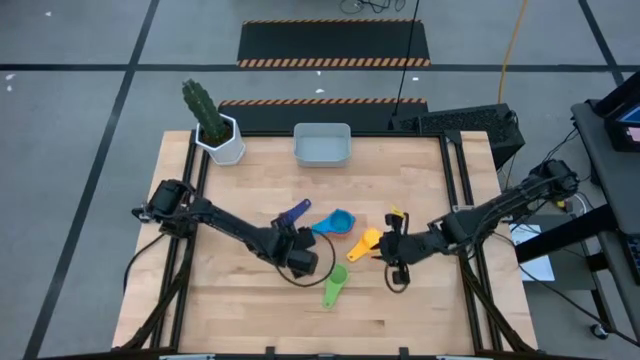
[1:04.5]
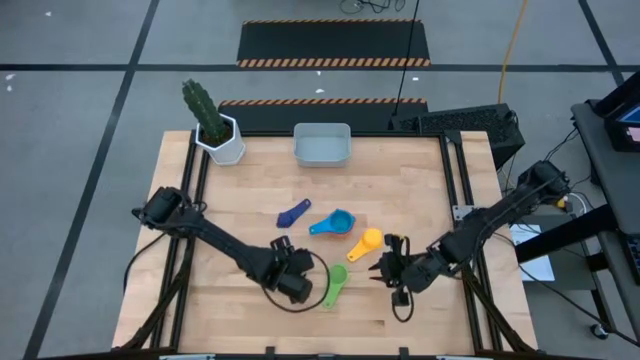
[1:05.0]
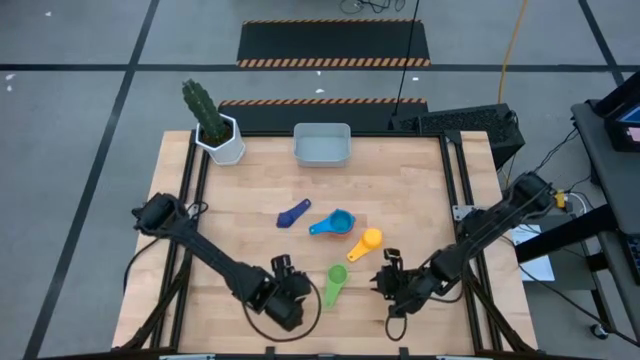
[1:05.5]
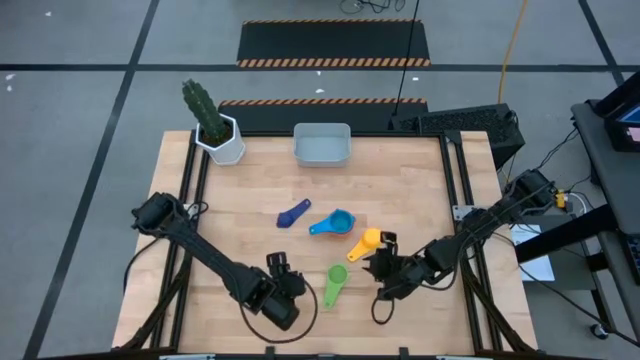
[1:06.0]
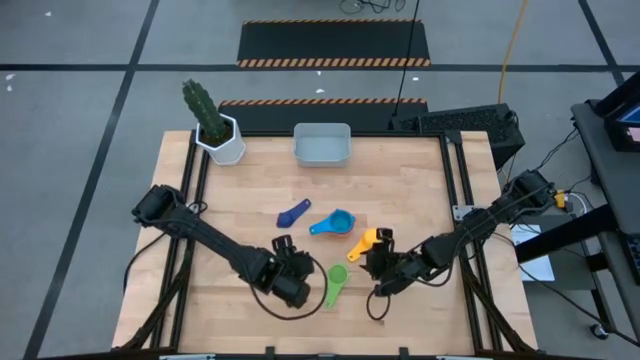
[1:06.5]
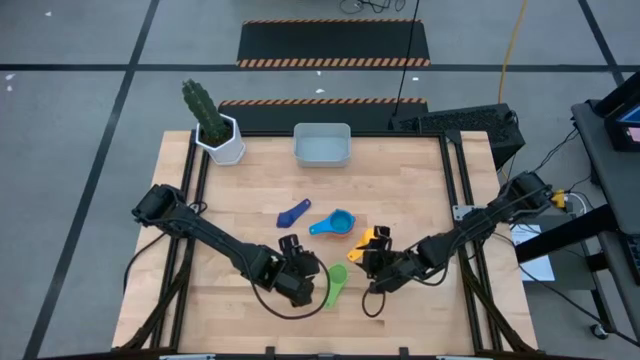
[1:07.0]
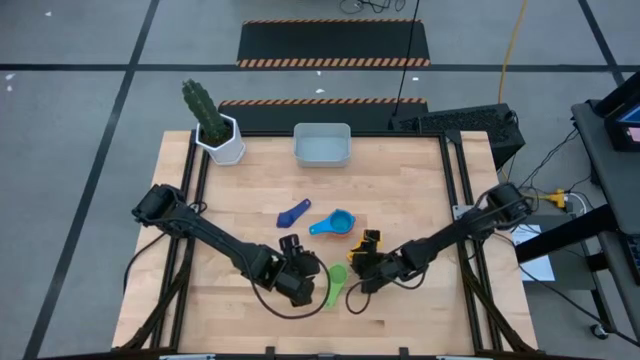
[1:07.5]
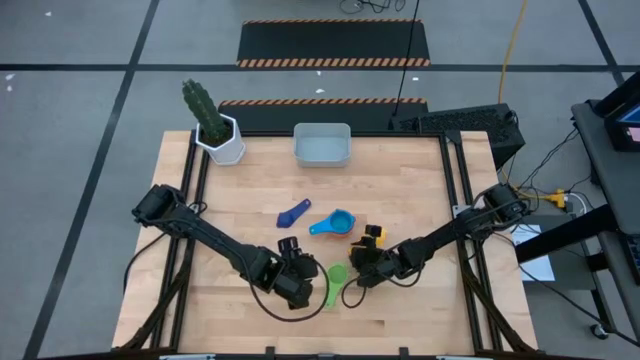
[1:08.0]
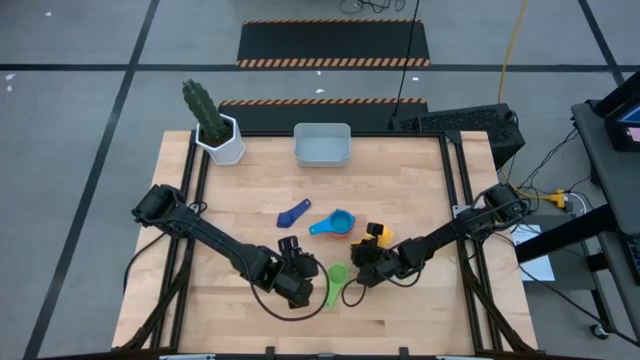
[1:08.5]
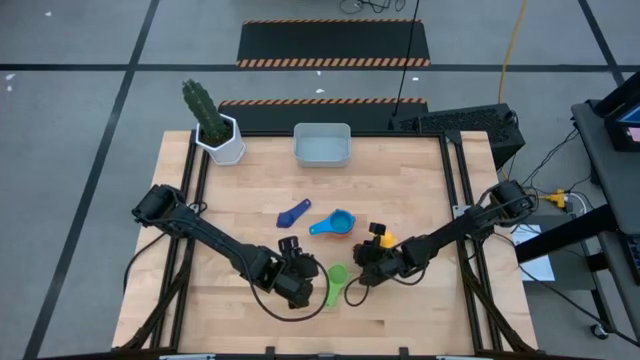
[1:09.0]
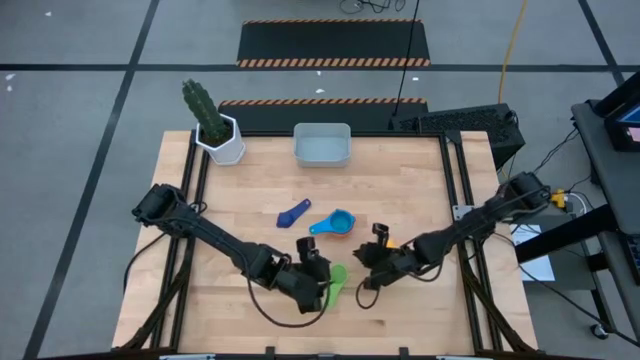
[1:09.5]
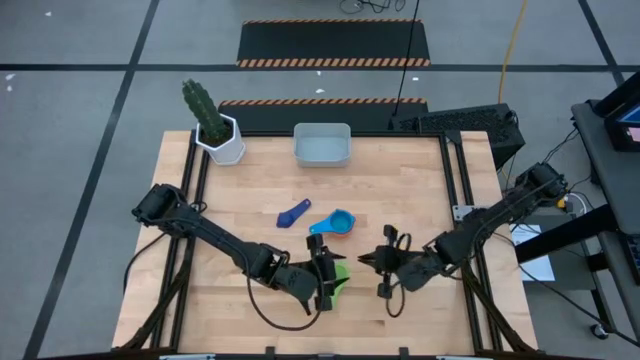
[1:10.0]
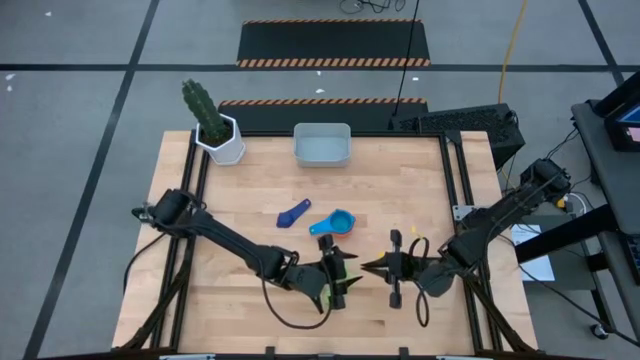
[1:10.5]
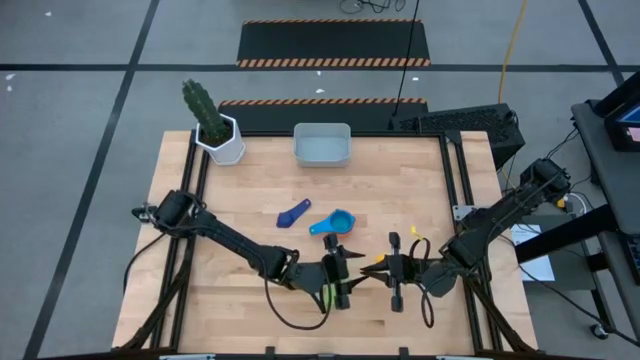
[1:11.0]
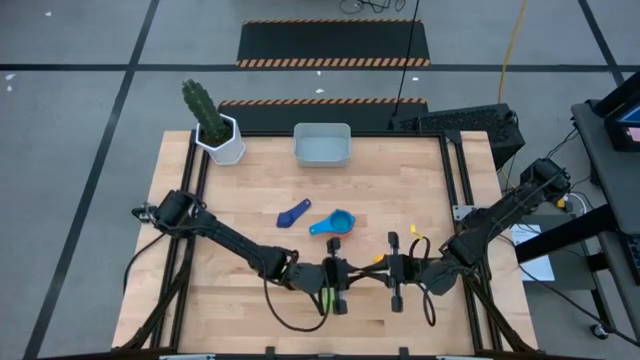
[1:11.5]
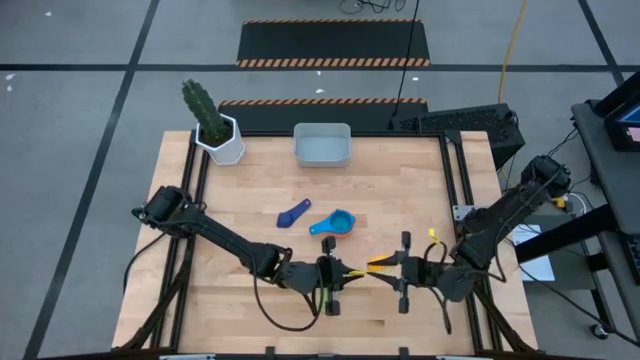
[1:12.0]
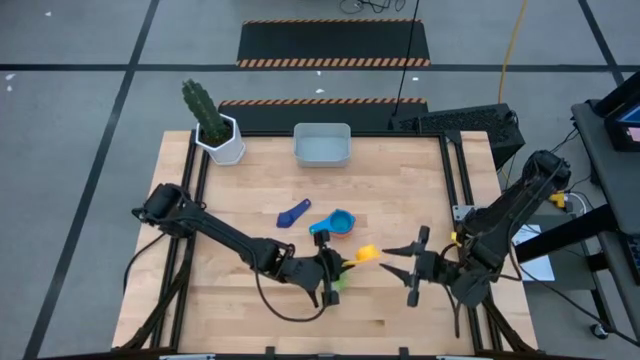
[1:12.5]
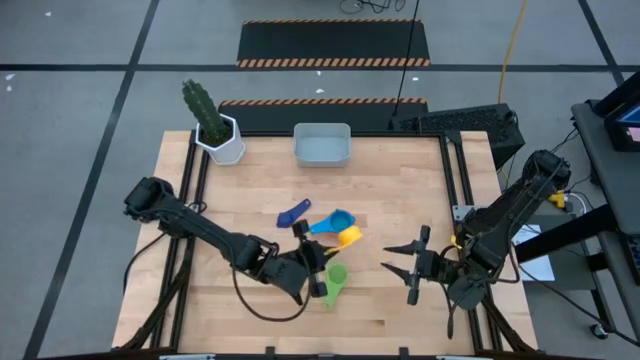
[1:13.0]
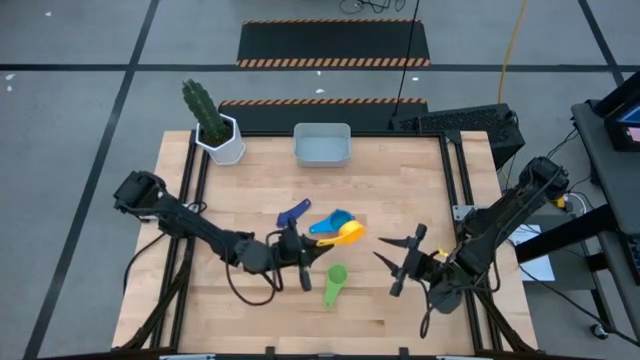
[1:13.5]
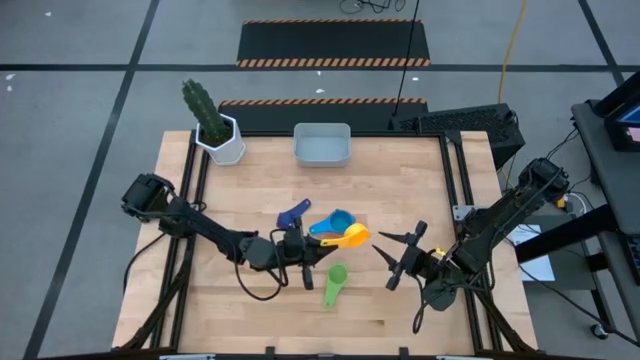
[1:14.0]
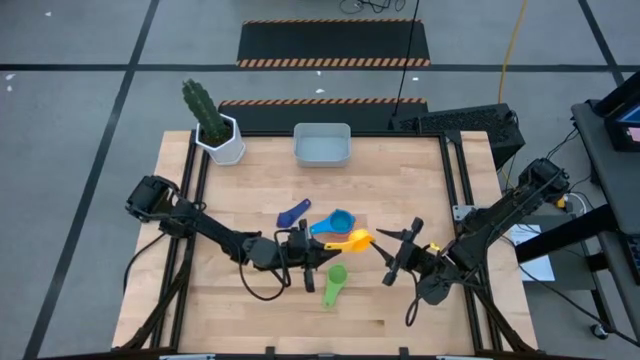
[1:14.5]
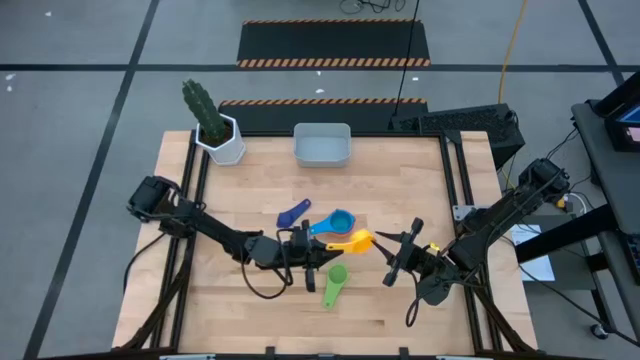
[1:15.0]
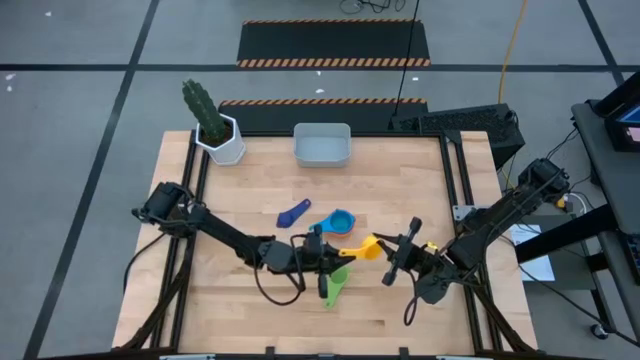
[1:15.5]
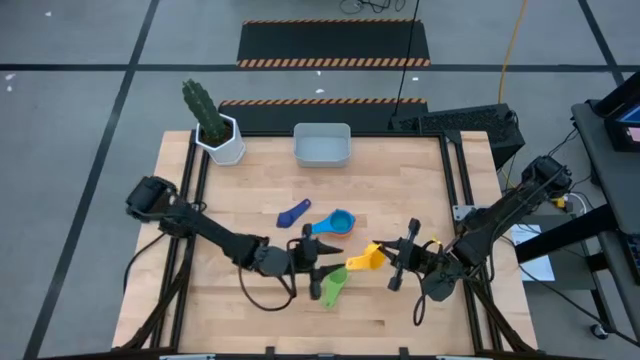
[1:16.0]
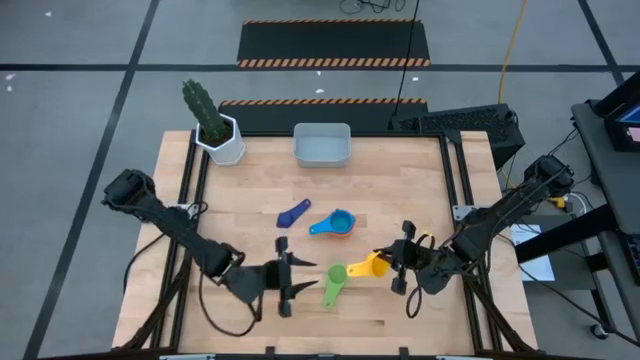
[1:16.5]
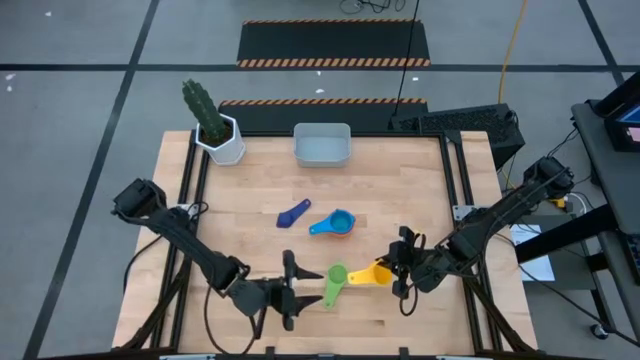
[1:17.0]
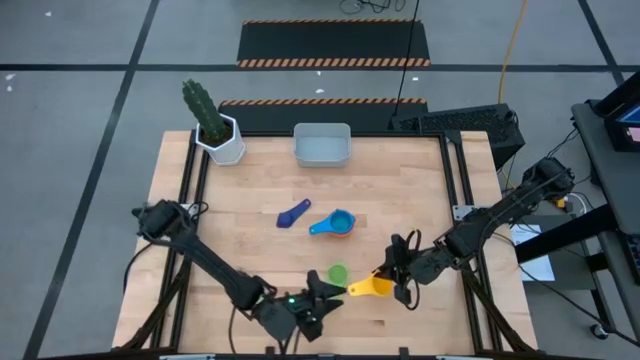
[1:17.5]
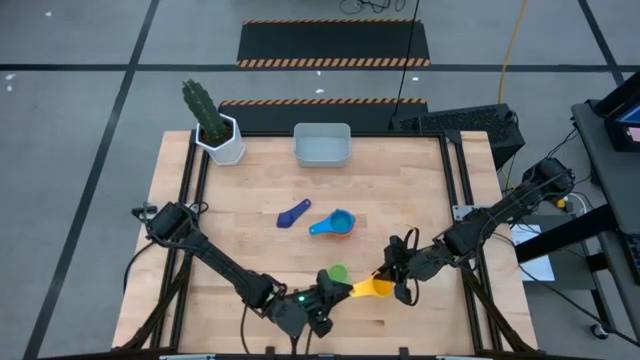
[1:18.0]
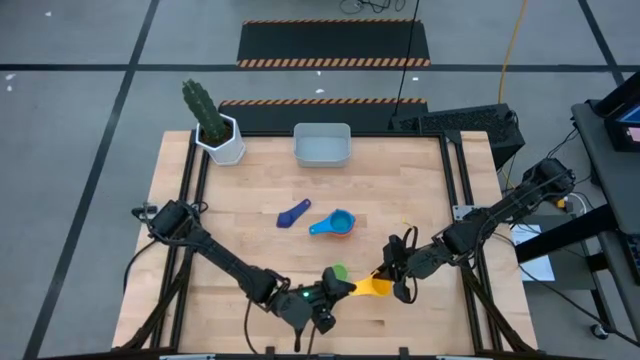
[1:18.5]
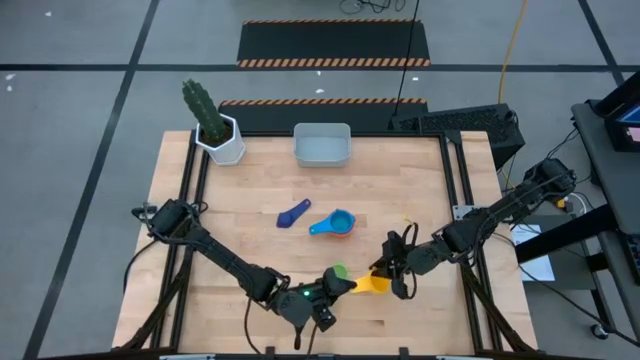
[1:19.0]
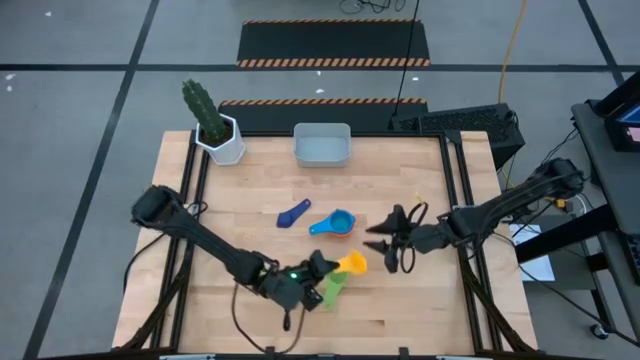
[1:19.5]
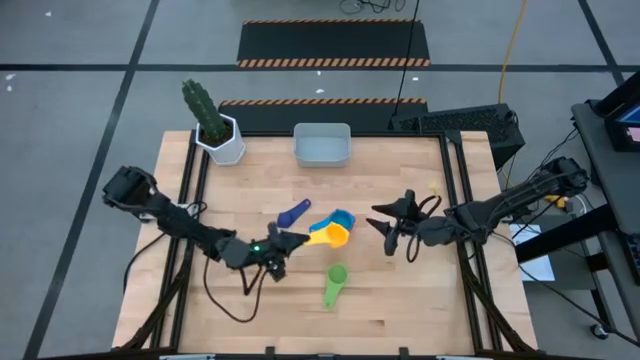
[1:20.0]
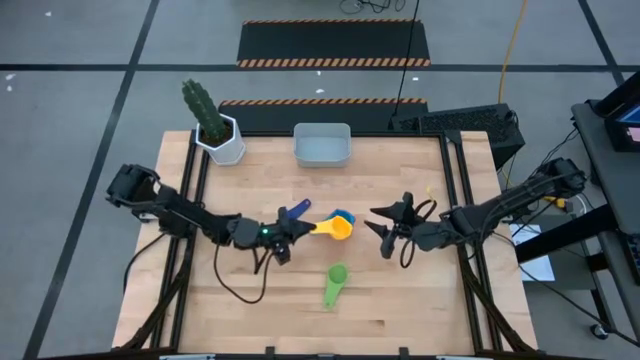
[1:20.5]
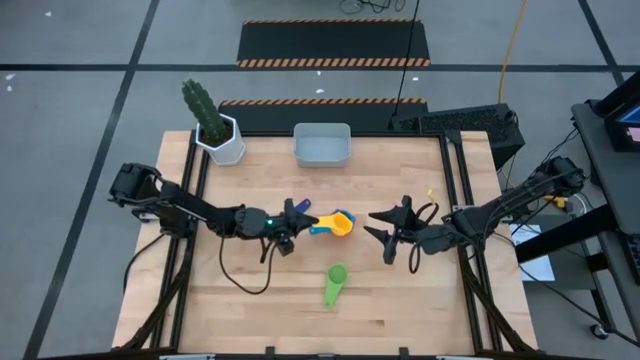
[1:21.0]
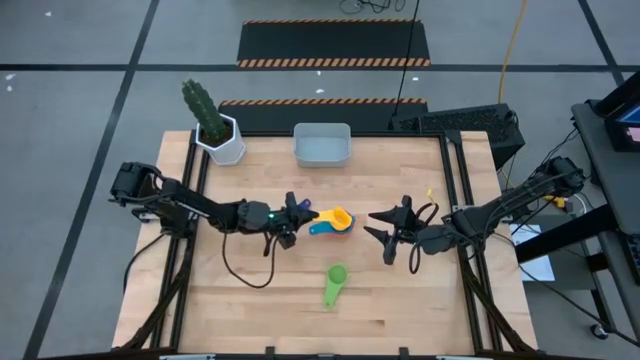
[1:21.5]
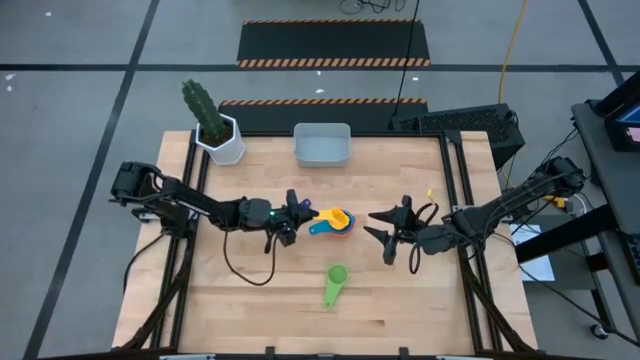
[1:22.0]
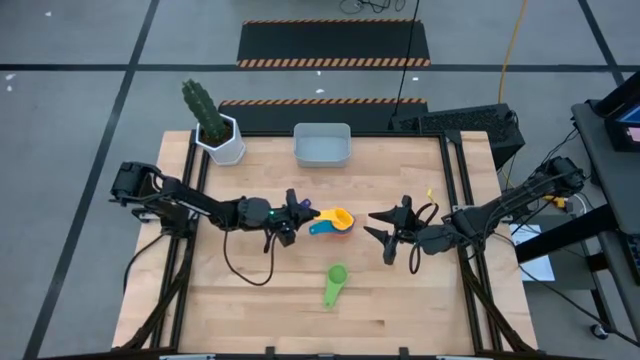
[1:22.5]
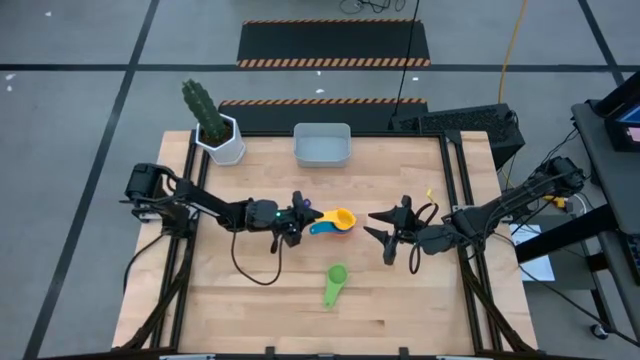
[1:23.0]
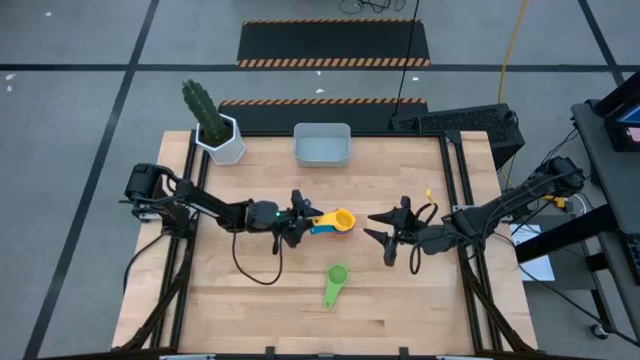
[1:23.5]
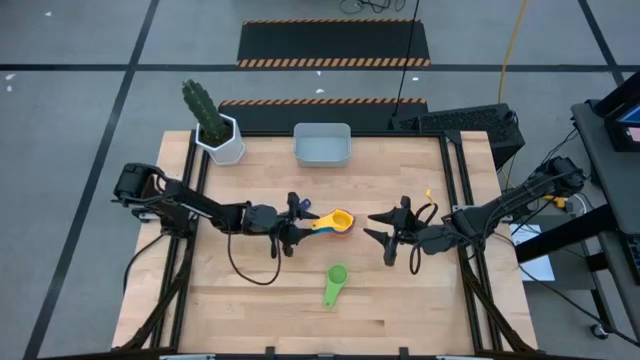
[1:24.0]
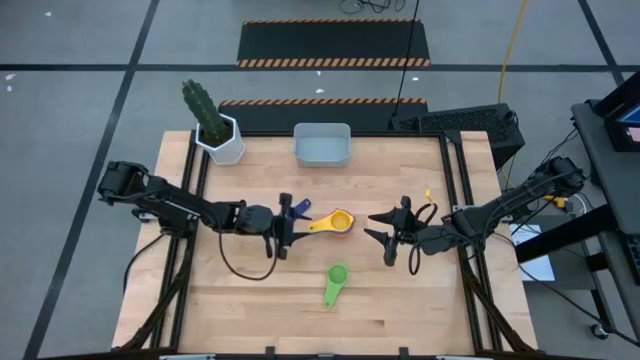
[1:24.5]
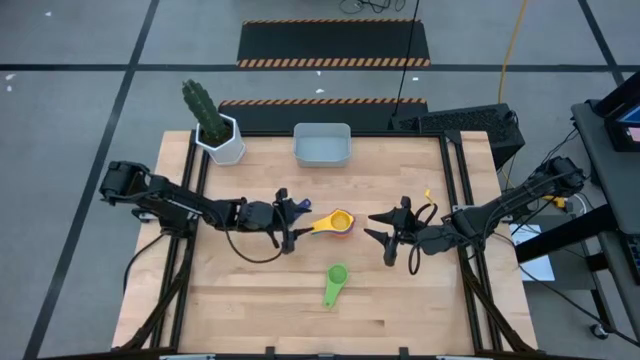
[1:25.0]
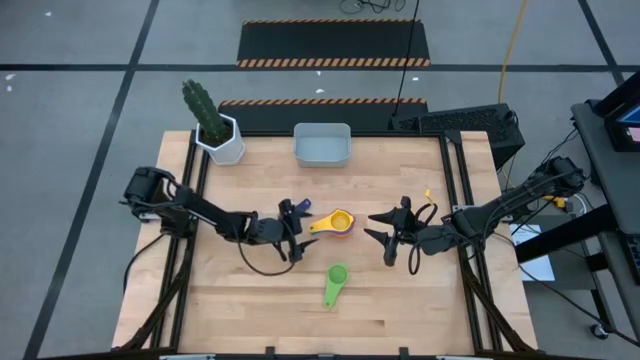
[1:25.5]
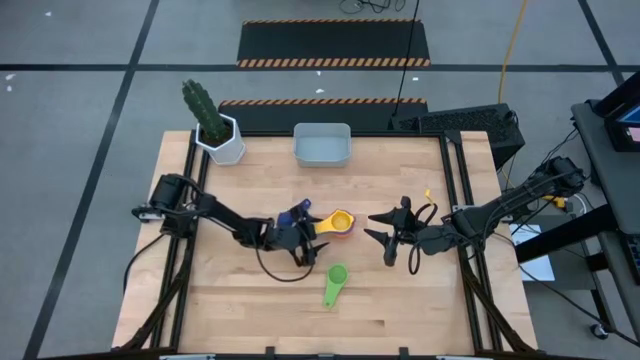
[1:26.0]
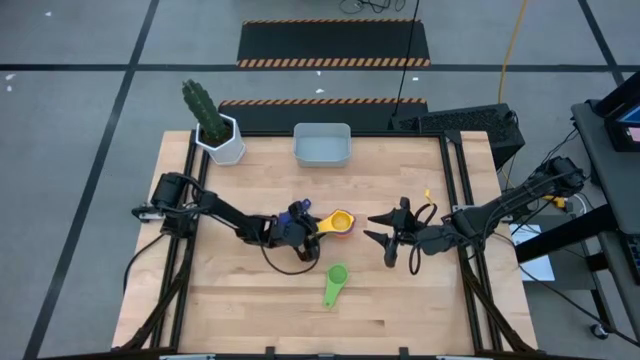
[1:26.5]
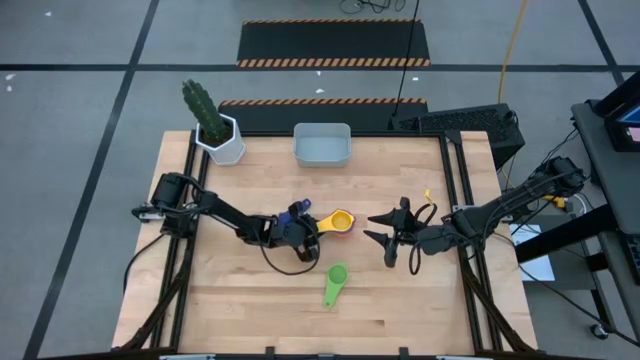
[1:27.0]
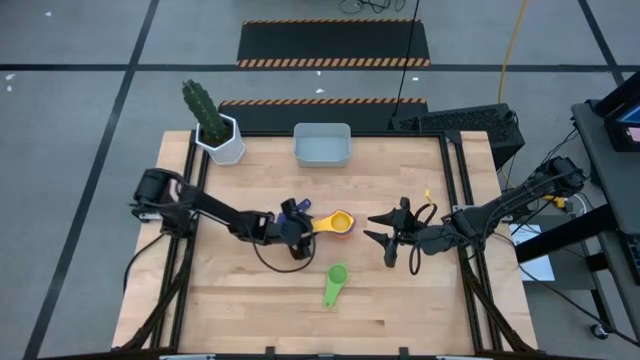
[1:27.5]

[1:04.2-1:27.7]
Task: Nest measuring cups in basket
Stack the yellow measuring cup on top of the light blue measuring cup
